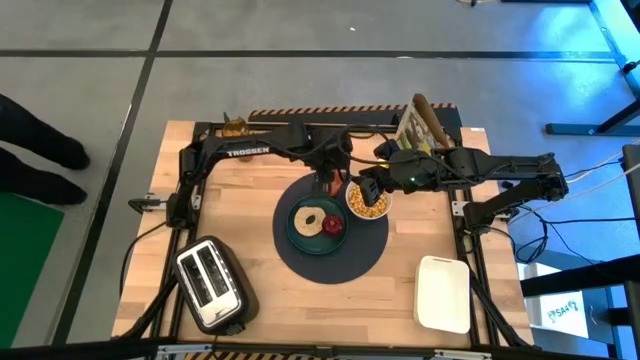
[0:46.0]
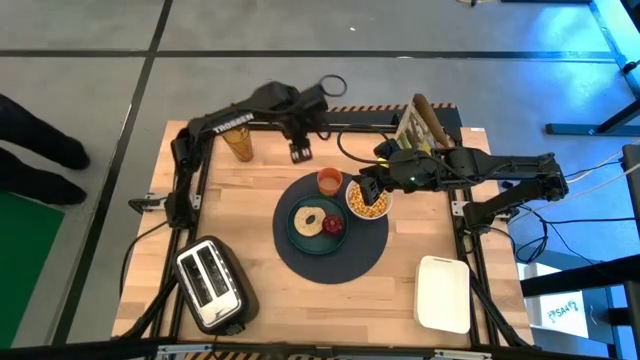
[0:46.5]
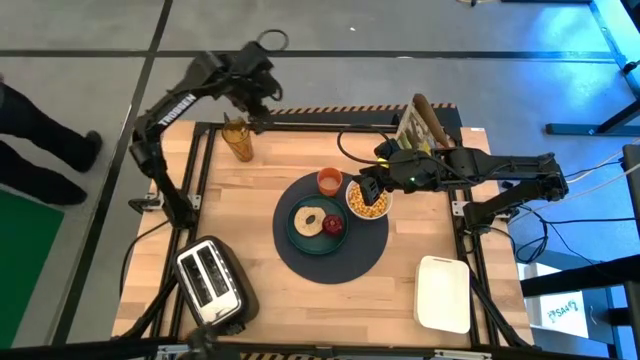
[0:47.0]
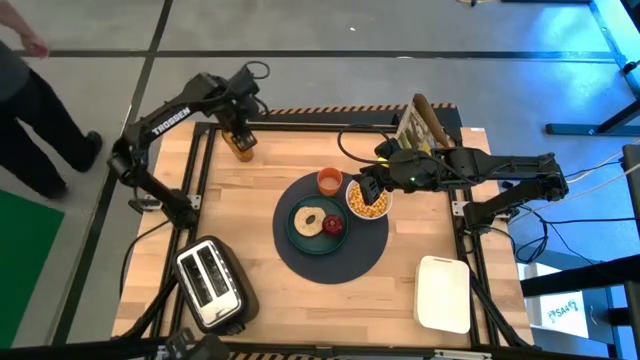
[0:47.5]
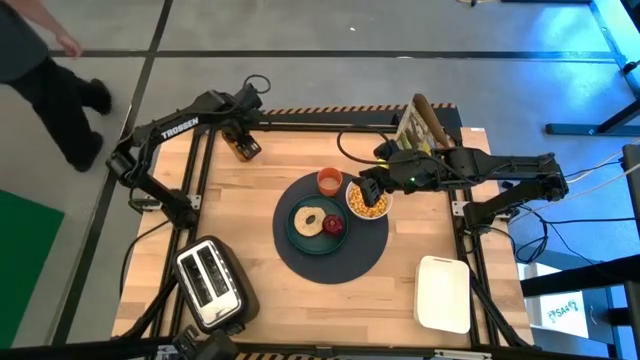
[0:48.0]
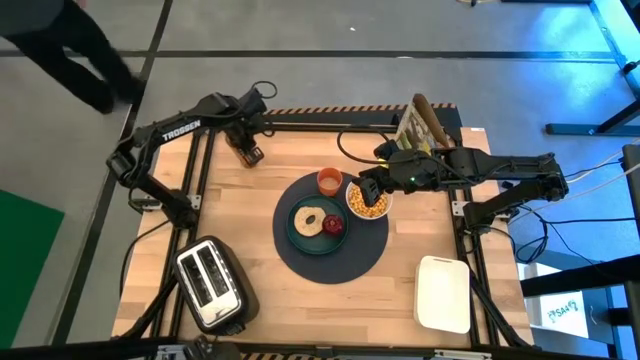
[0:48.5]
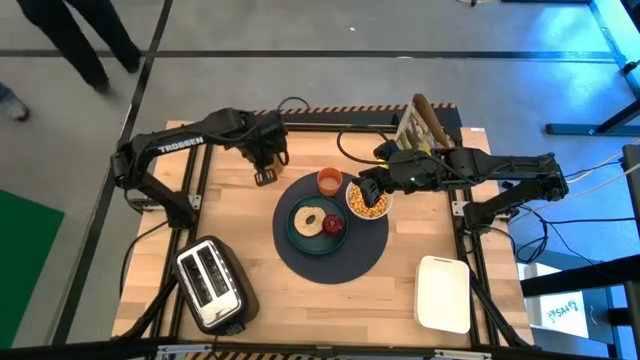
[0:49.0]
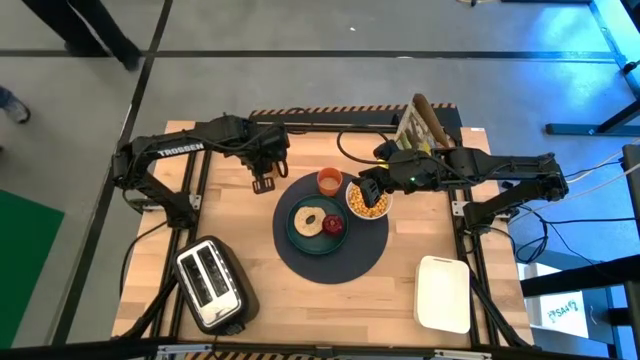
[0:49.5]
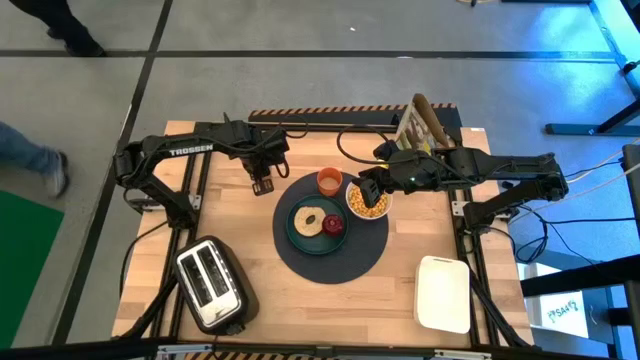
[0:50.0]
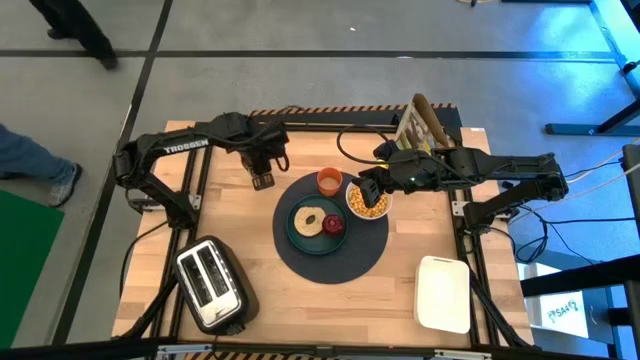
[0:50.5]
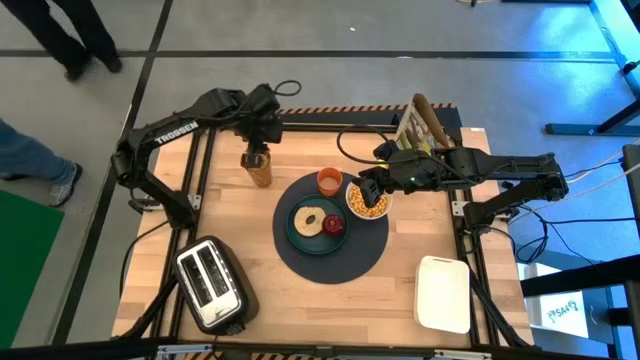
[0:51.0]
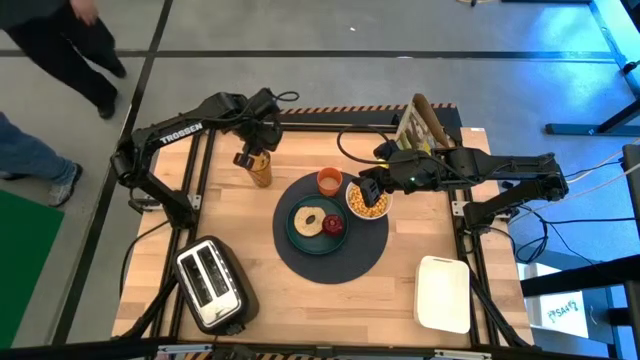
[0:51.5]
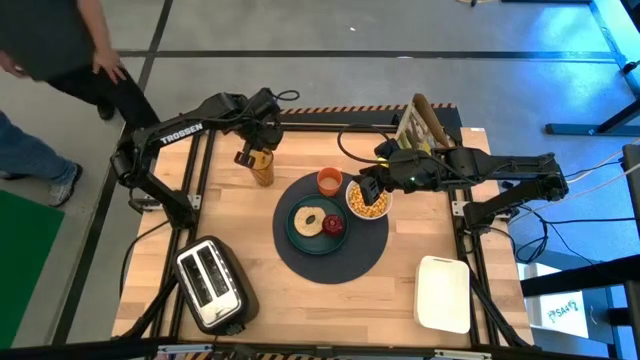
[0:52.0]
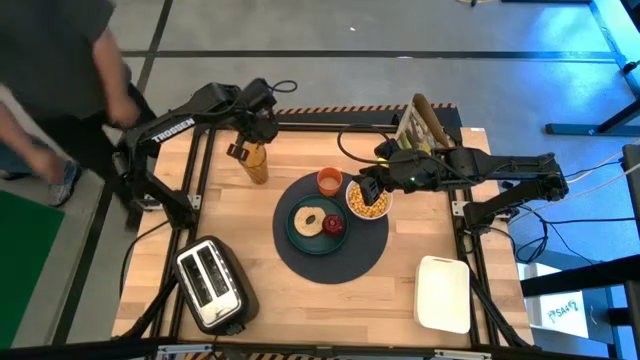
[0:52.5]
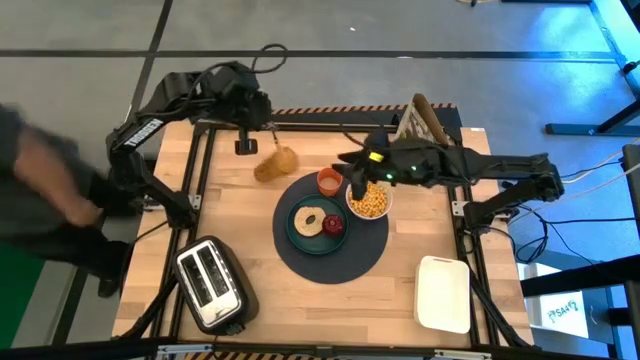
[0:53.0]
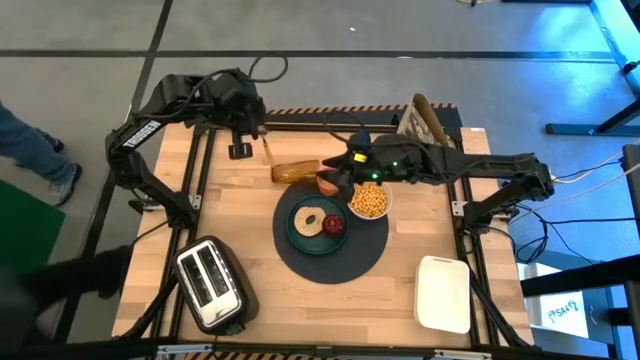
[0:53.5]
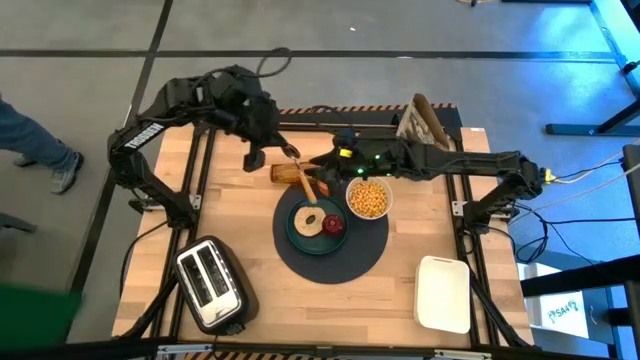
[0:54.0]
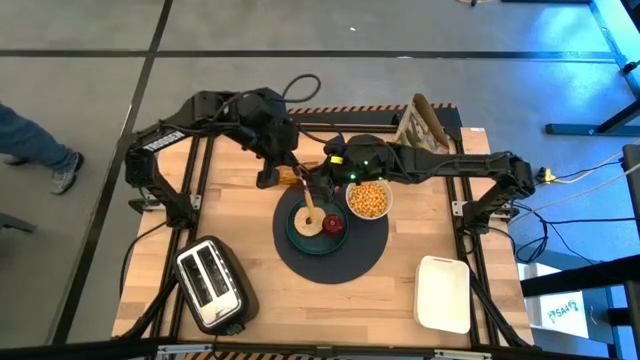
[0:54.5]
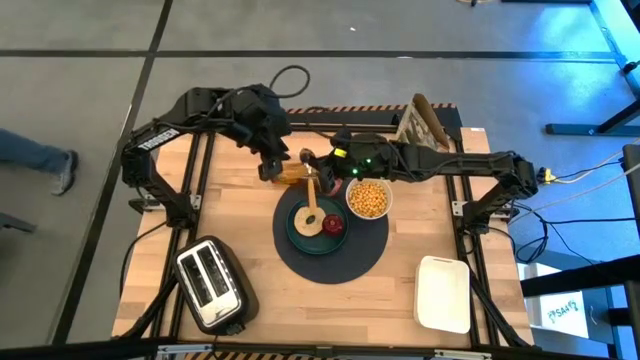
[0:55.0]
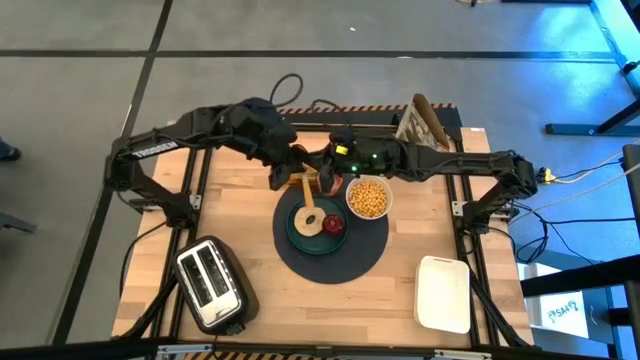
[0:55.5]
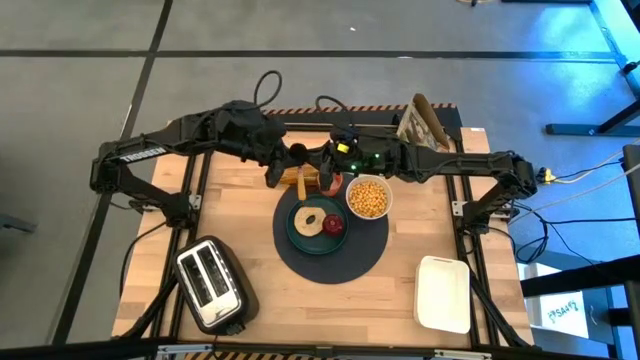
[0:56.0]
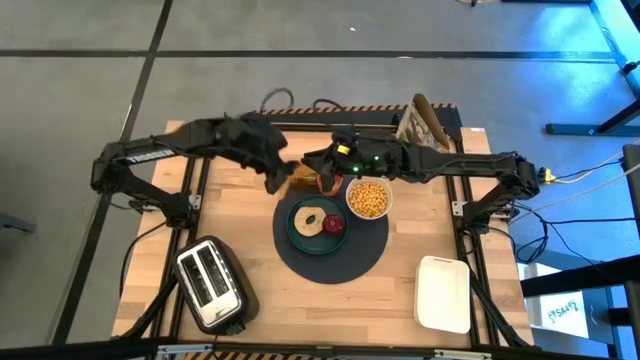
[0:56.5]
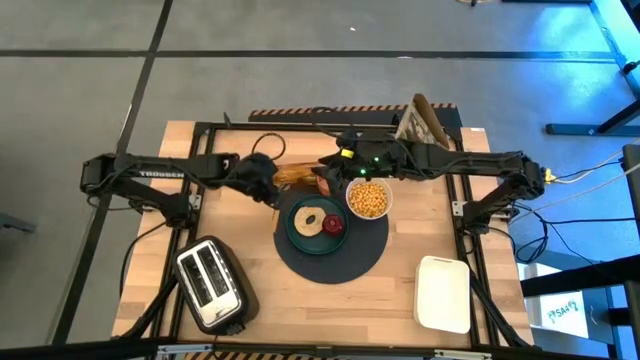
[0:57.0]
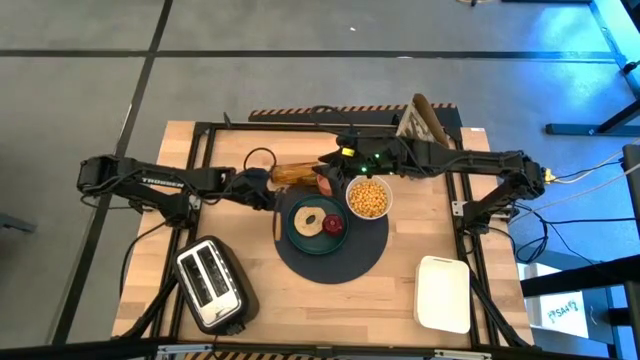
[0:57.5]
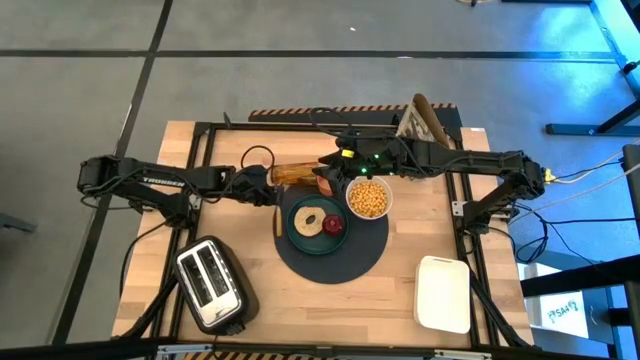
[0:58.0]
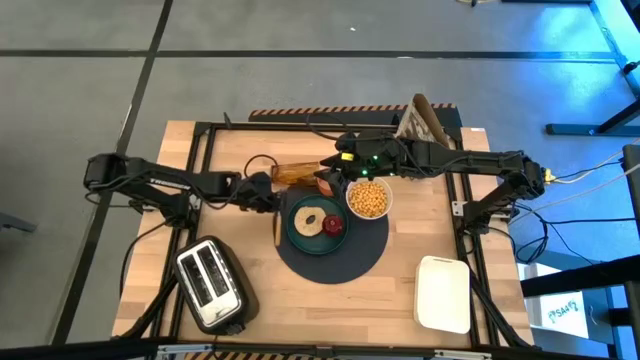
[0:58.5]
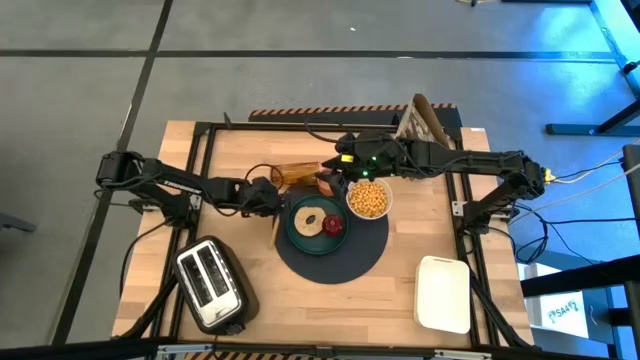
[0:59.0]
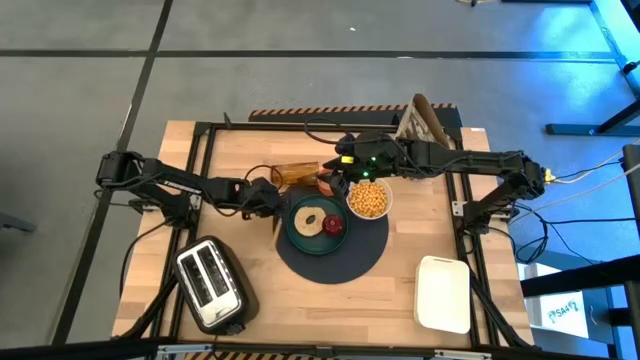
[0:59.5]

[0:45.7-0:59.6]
Task: Arrange a breakfast setting
Put the yellow spoon on the black tablemat to the left of the green plate

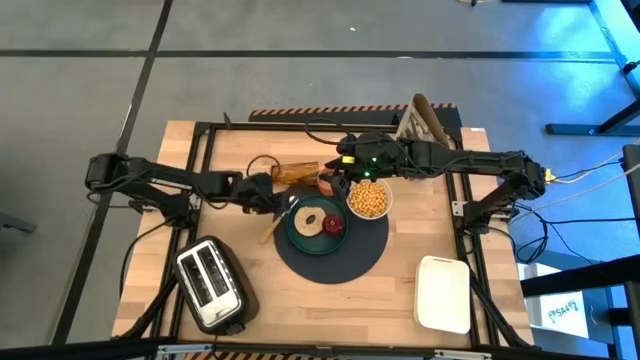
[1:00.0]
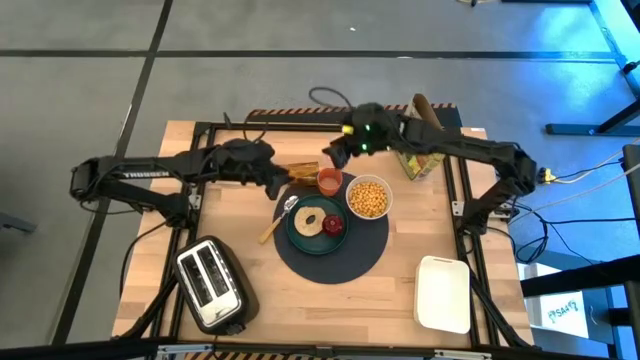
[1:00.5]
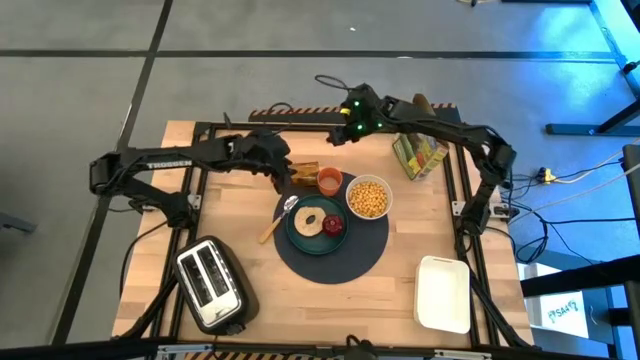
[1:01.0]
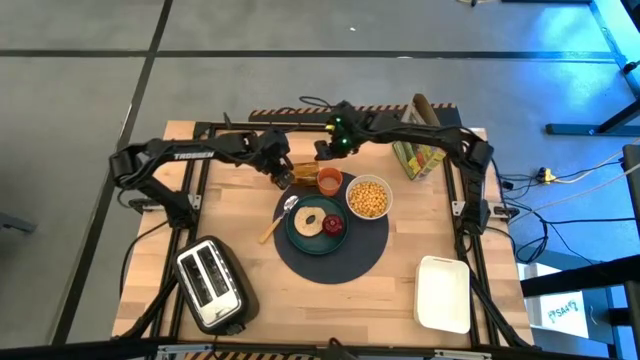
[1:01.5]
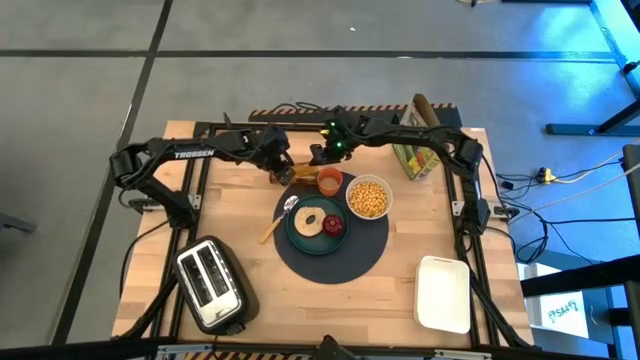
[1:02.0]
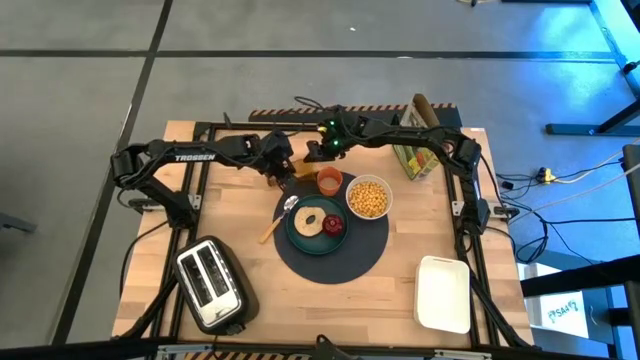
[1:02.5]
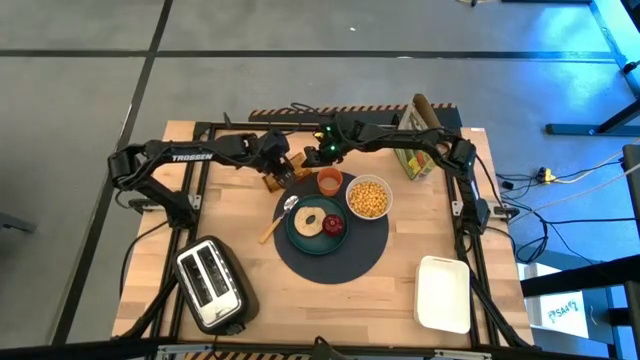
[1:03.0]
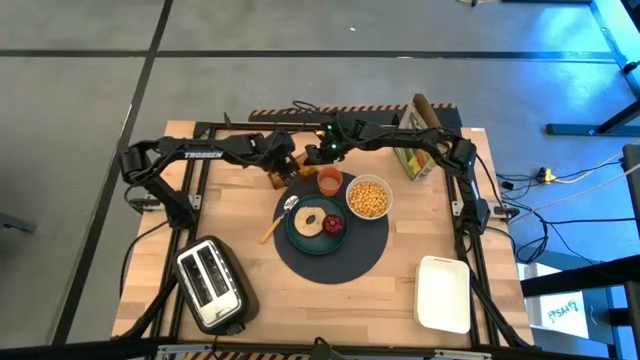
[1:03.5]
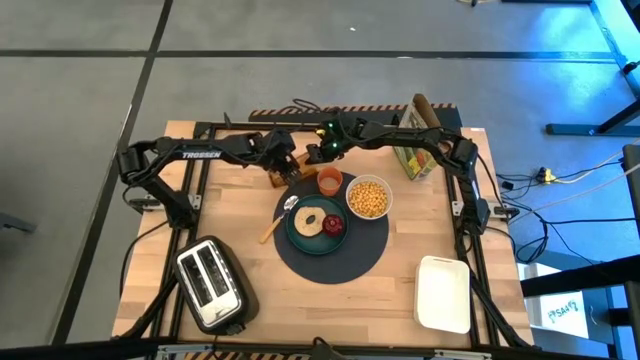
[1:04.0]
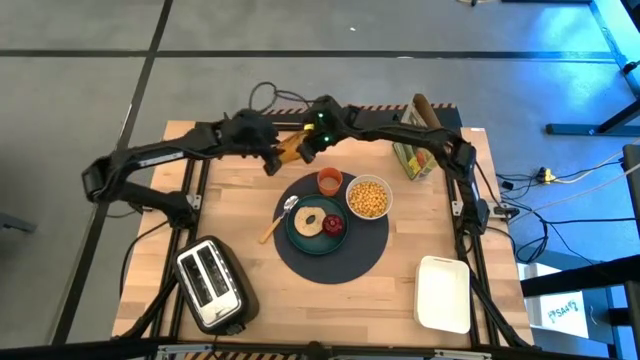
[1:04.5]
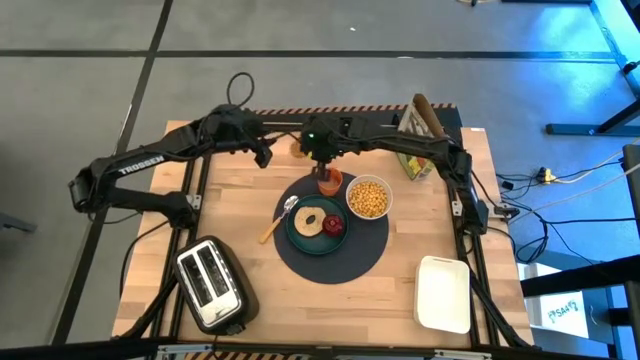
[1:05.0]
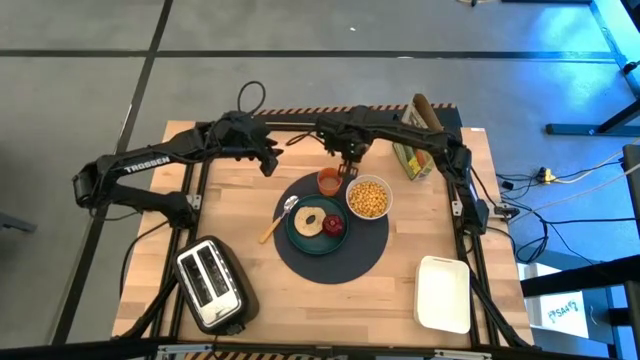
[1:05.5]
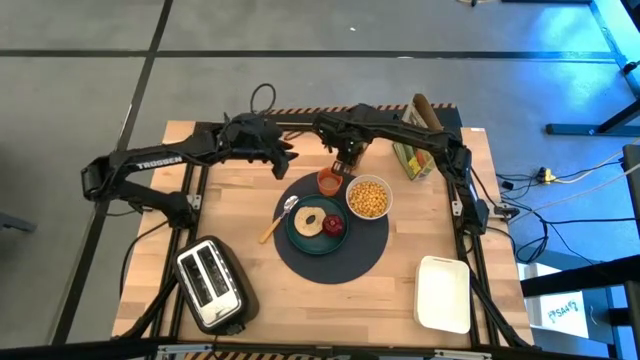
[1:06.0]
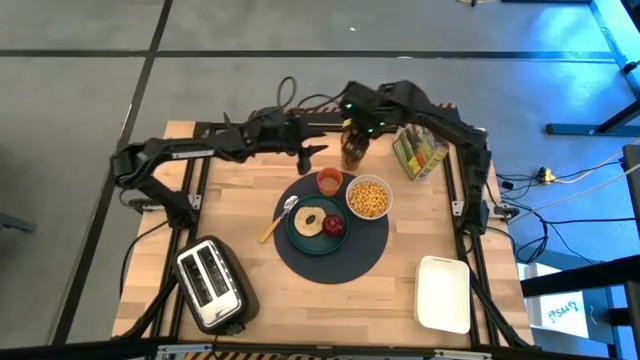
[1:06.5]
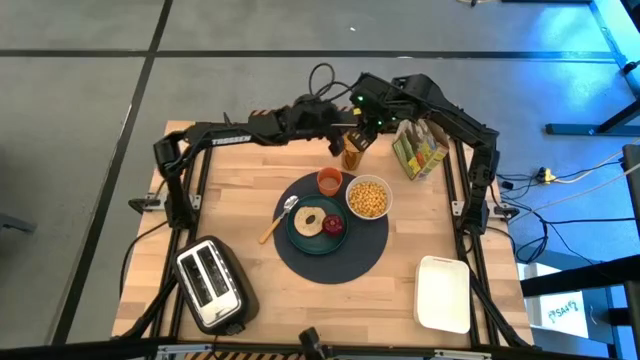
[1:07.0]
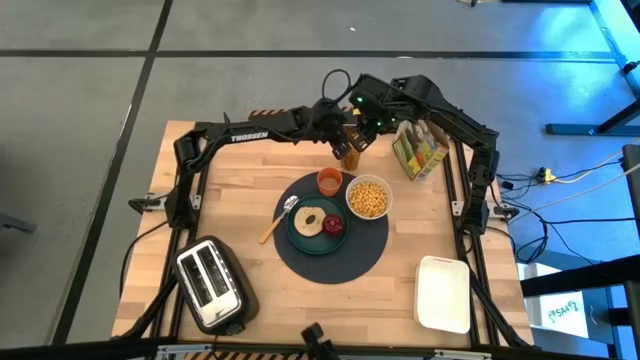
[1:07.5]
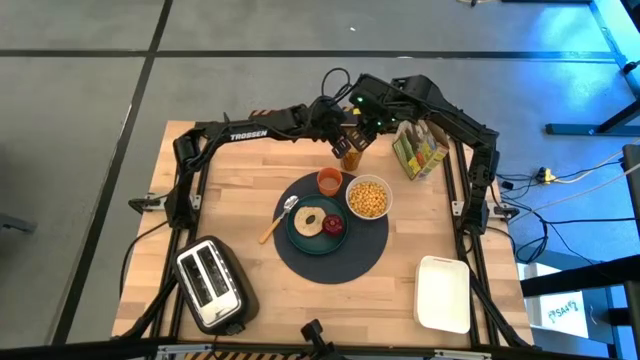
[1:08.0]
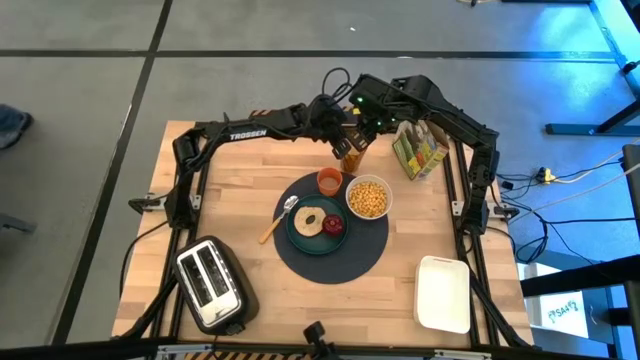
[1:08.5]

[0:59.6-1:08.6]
Put the brown cup to the top right of the black tablemat
